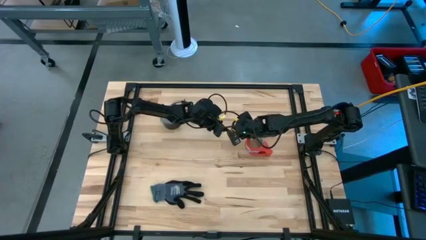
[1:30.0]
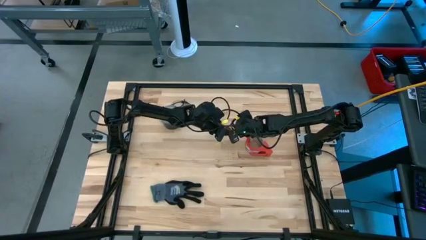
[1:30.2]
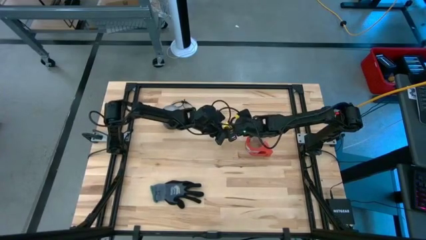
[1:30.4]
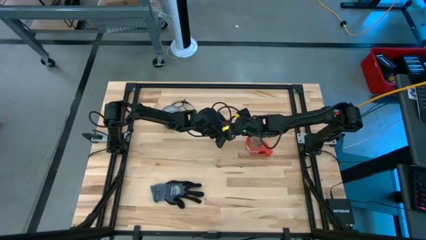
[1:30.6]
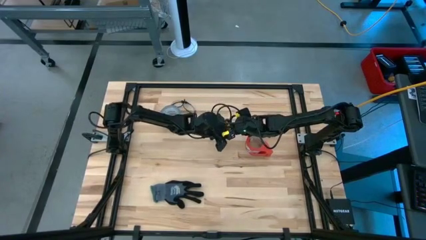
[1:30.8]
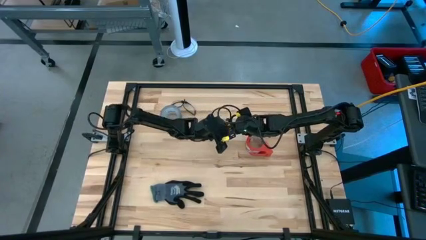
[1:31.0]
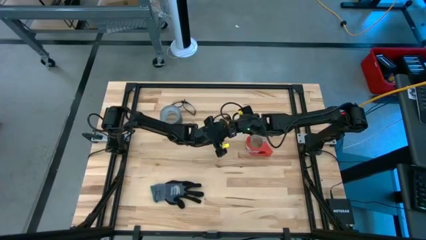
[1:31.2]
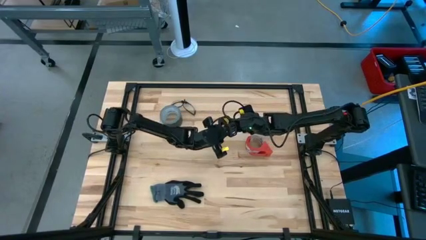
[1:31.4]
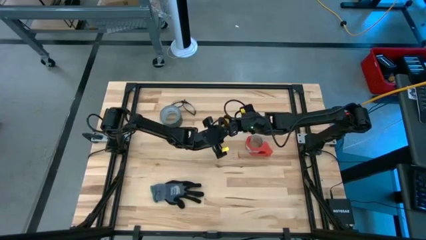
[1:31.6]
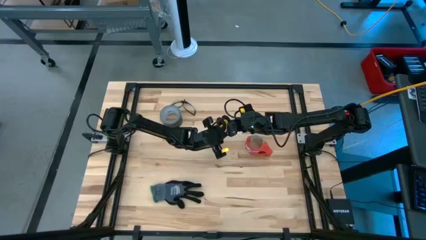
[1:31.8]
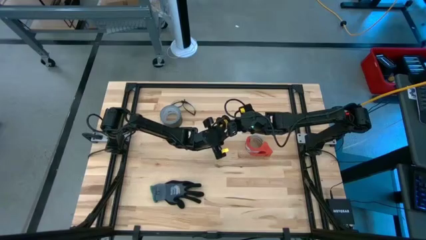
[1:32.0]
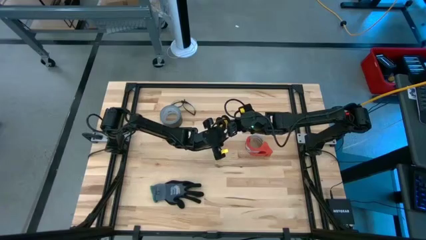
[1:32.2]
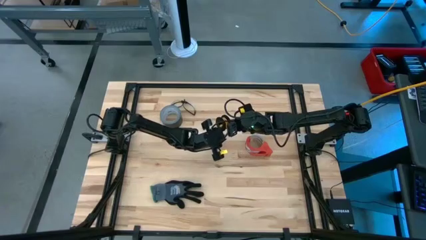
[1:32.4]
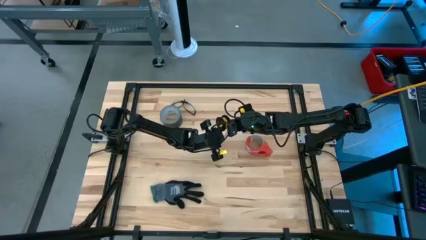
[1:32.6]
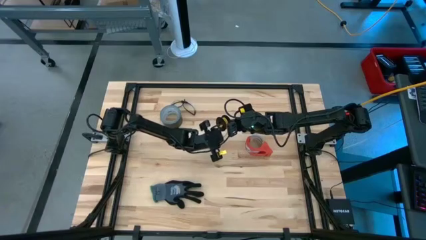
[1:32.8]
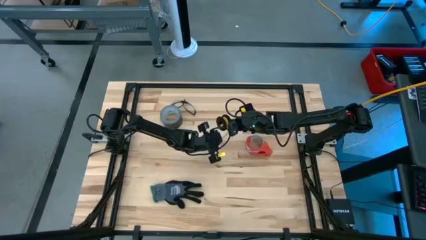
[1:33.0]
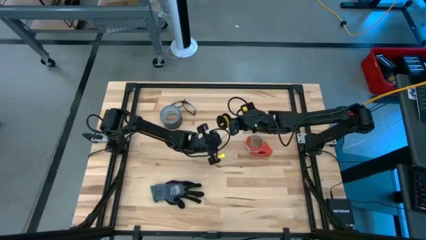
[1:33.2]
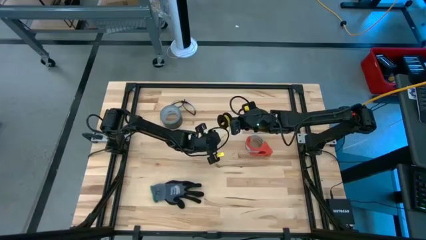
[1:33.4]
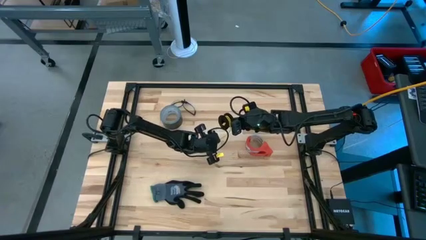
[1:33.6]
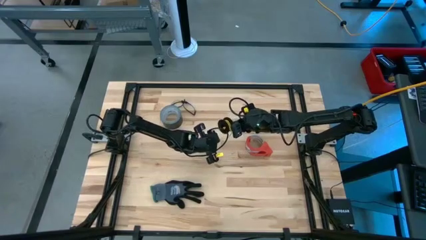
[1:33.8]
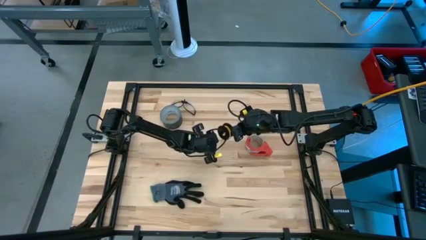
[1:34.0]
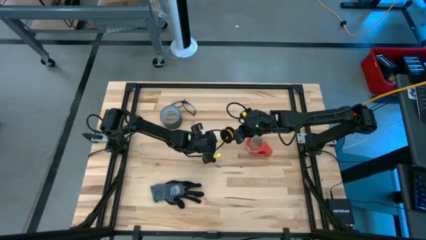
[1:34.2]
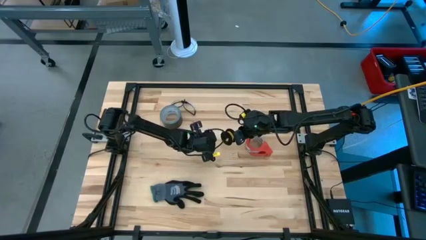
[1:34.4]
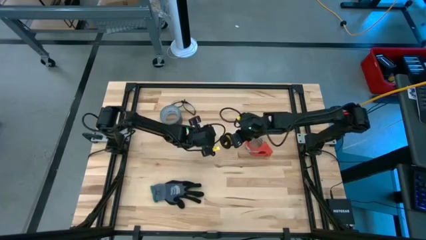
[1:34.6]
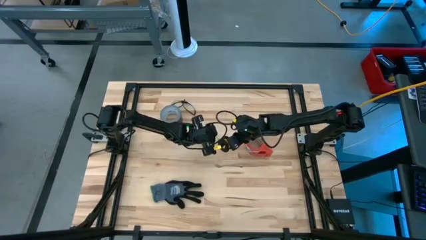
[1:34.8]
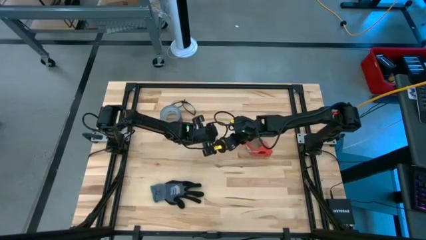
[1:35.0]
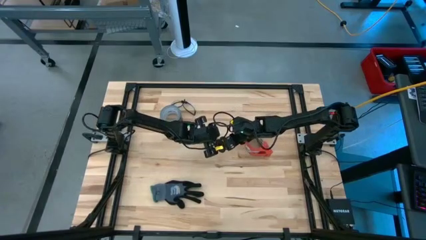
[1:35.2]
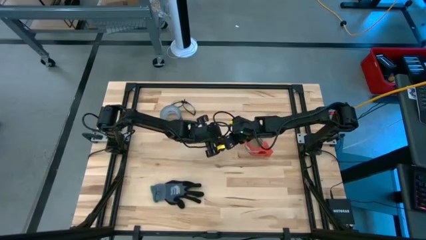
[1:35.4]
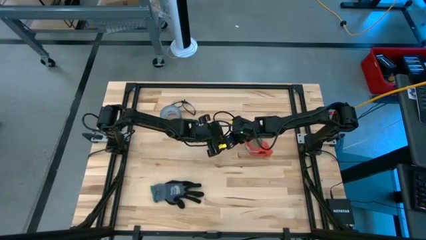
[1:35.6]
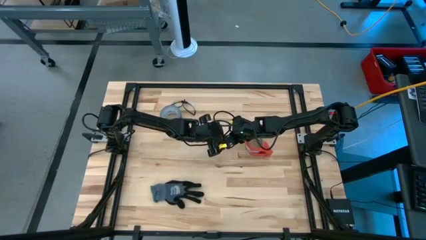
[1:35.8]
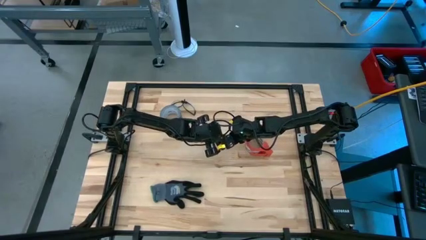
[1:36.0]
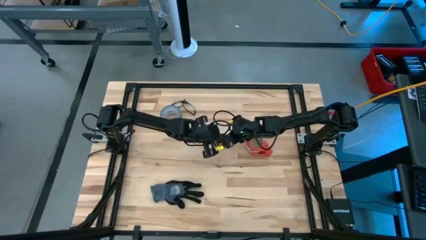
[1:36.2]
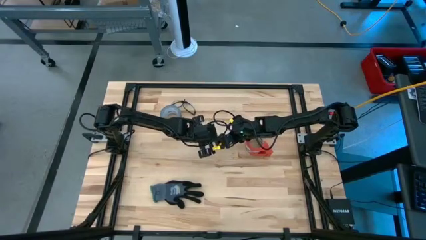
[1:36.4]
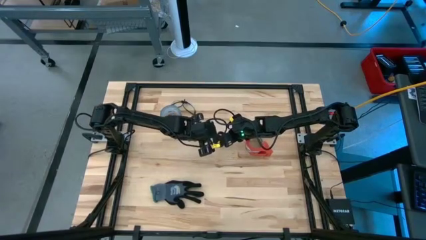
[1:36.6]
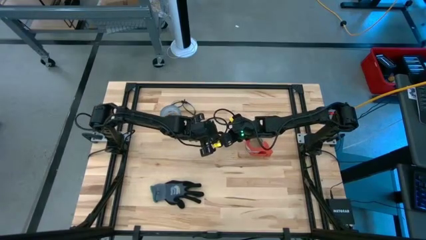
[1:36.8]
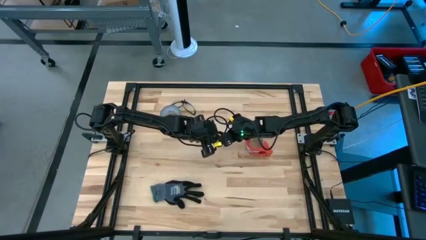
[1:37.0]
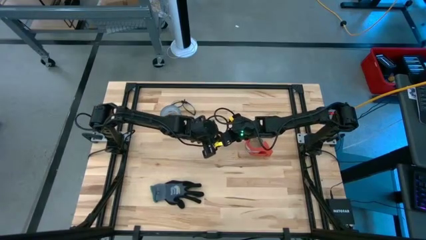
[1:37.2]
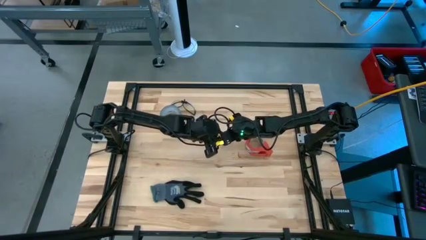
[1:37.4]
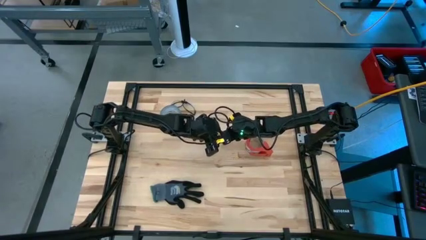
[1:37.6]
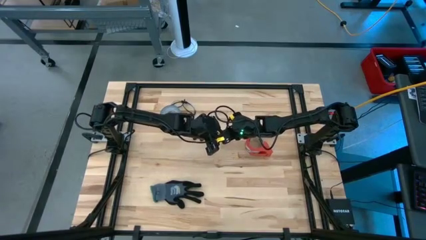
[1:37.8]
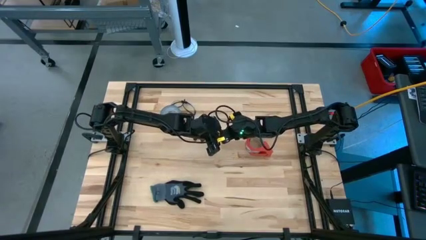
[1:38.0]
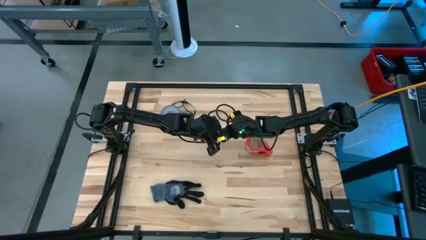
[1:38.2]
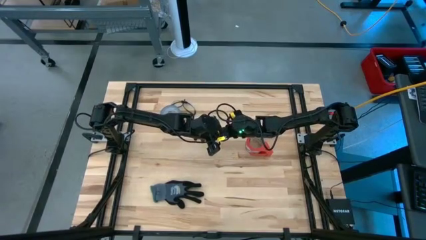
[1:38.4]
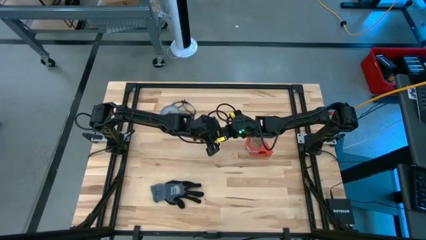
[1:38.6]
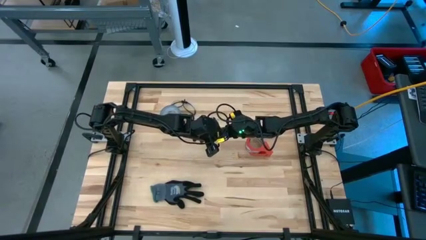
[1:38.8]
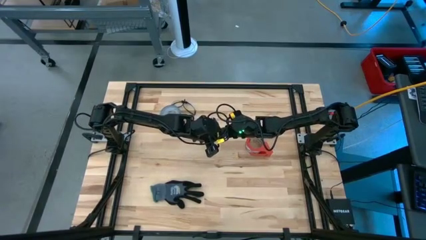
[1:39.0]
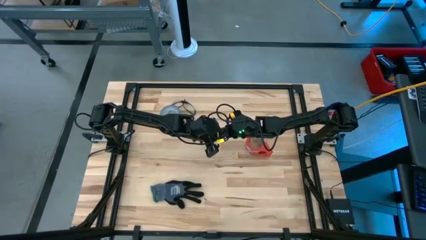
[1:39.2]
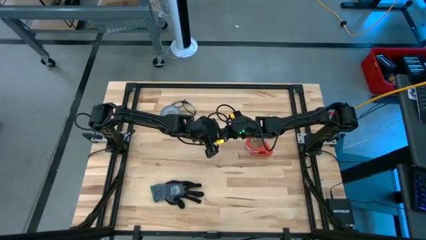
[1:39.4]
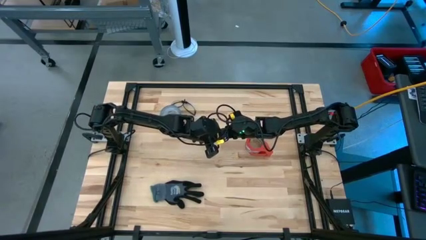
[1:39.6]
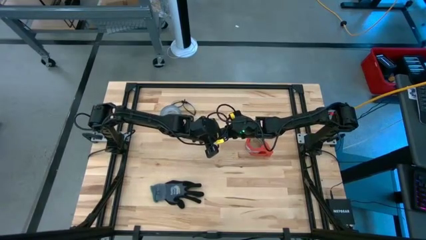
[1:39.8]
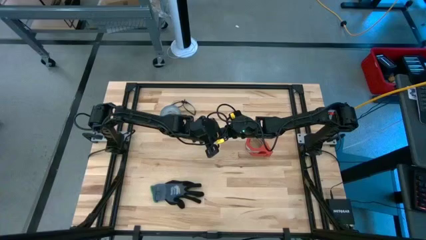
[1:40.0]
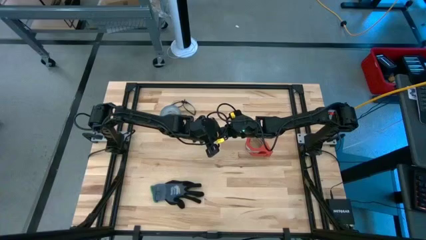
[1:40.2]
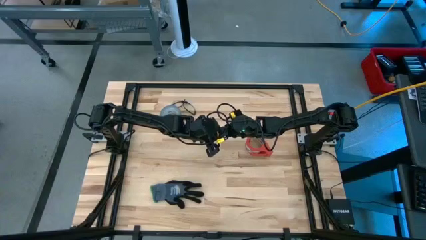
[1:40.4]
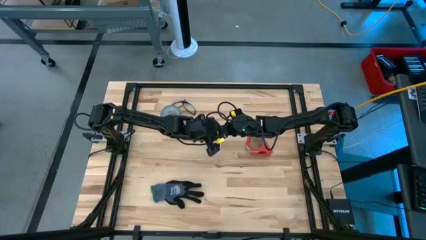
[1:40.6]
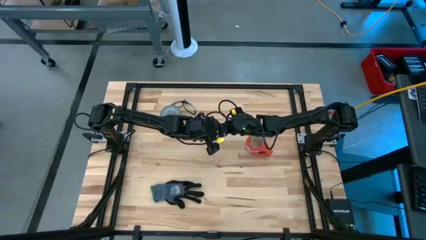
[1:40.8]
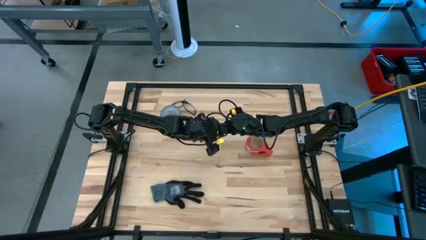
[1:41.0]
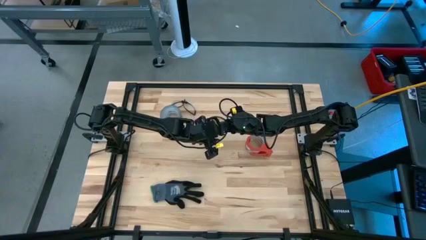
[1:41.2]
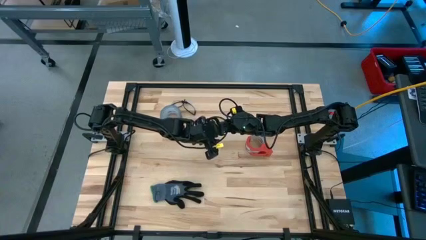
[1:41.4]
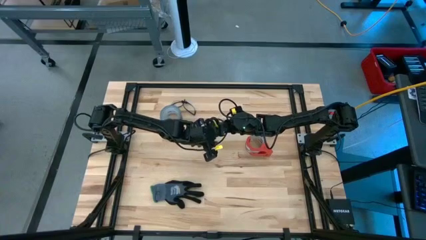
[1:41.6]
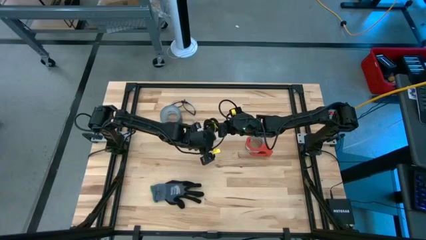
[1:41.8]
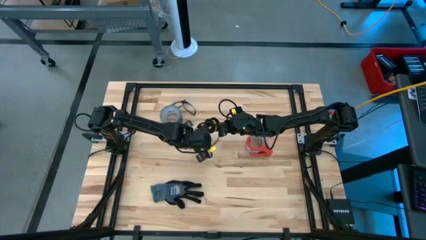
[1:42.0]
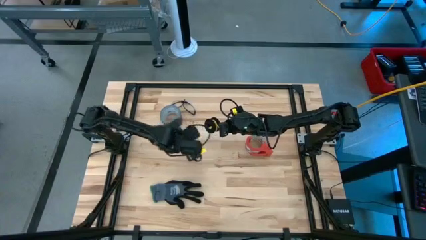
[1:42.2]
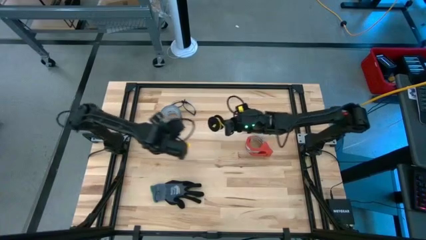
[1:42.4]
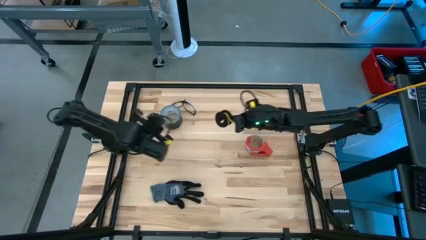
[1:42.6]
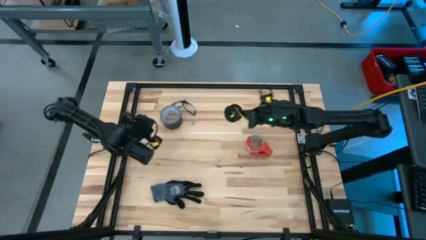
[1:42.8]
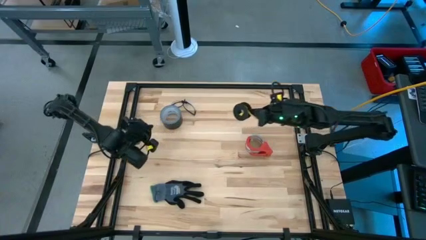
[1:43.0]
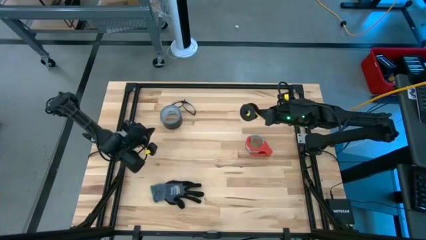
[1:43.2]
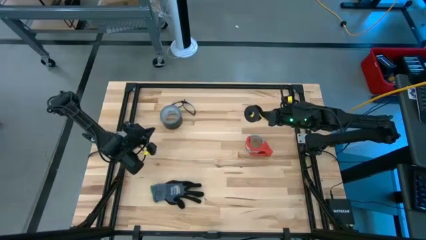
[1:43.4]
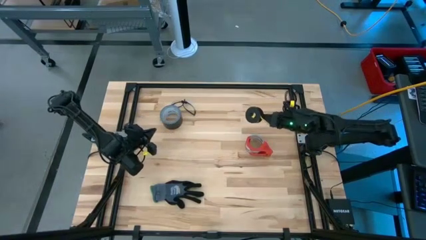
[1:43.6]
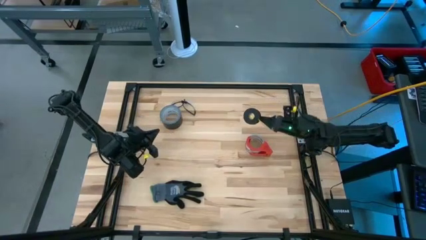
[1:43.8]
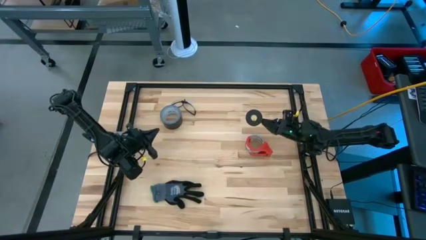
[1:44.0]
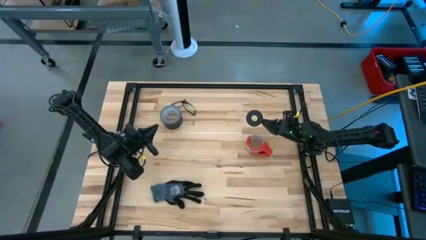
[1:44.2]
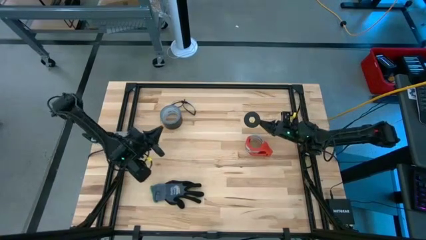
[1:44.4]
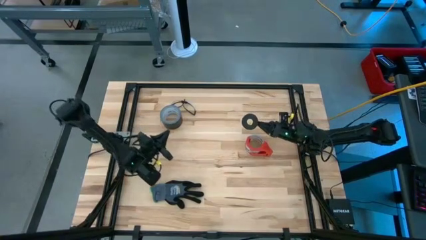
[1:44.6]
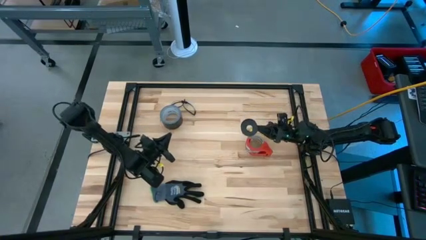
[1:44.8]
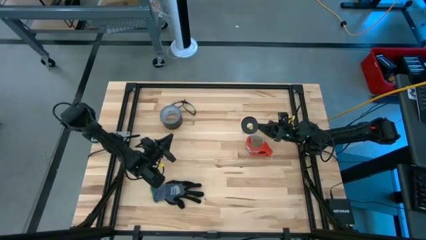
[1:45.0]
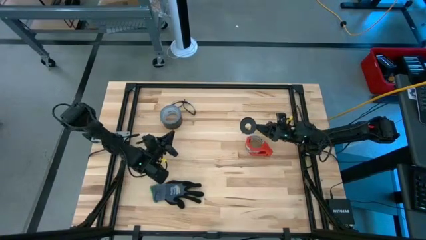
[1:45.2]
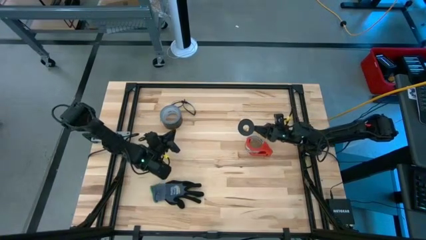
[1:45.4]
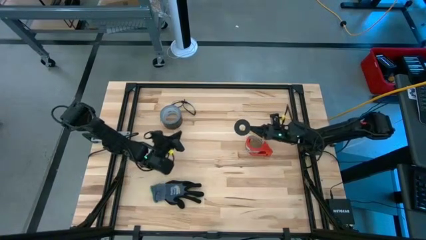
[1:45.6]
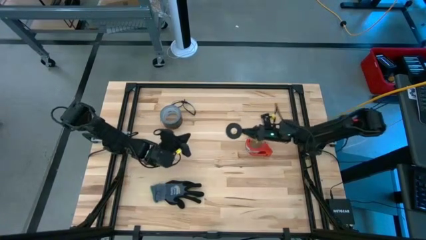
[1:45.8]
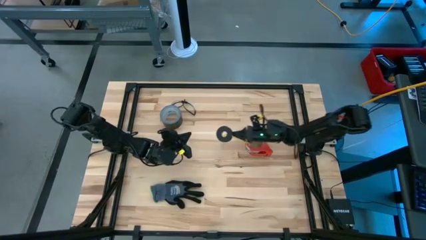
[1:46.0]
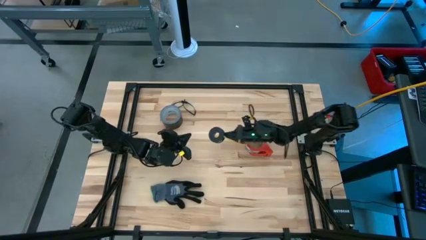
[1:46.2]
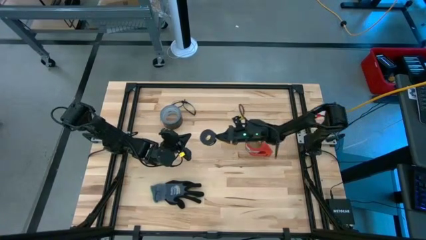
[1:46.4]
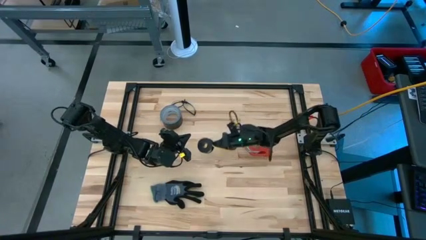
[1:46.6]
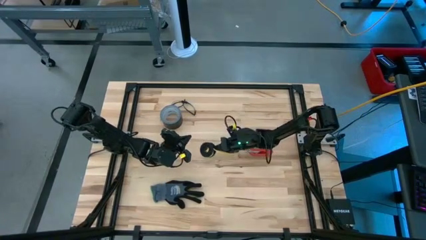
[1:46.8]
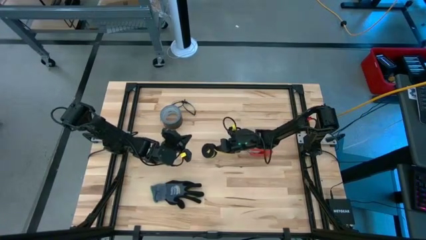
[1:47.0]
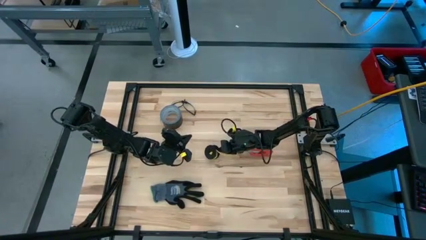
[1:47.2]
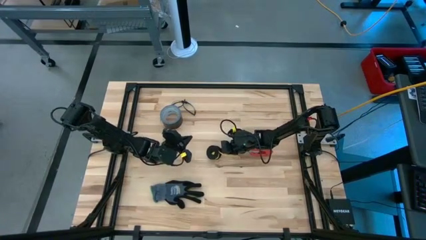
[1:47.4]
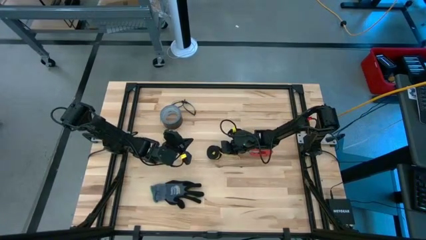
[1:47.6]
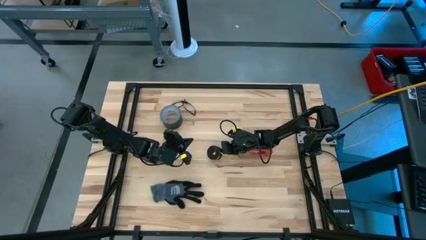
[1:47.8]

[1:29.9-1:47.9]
Task: Coil cords
Coil the yellow wire onto the spool
